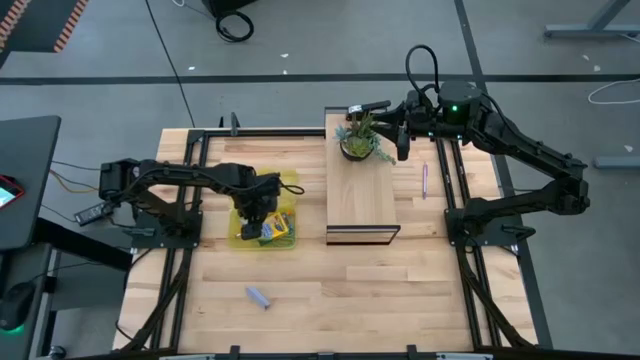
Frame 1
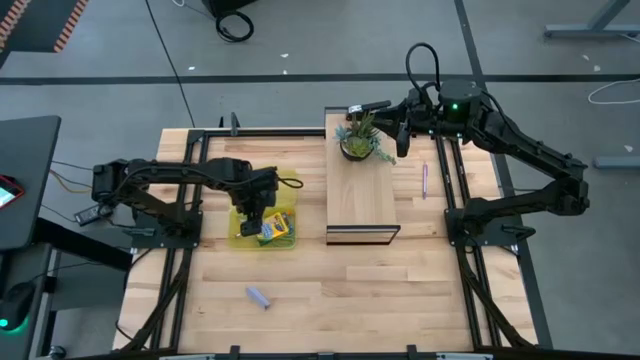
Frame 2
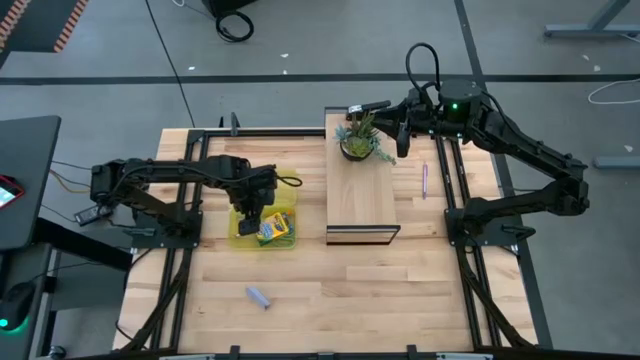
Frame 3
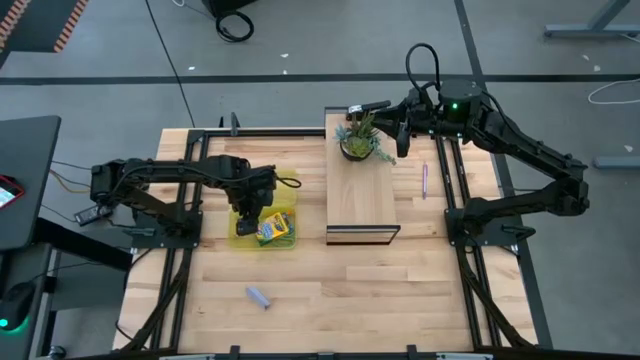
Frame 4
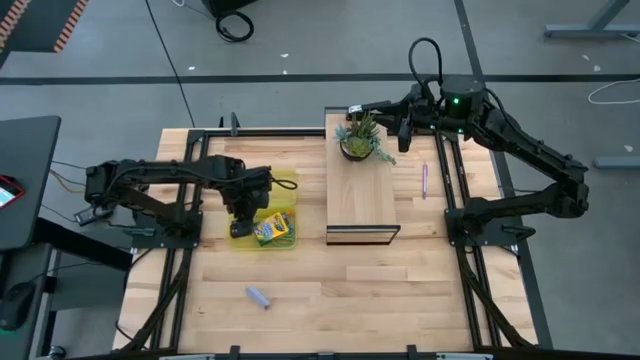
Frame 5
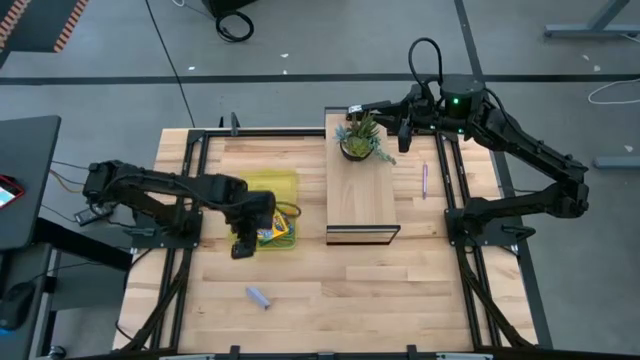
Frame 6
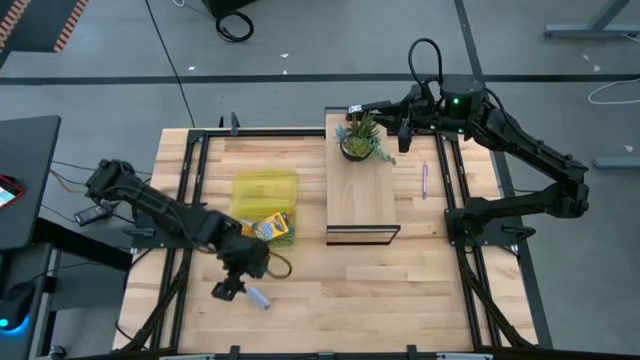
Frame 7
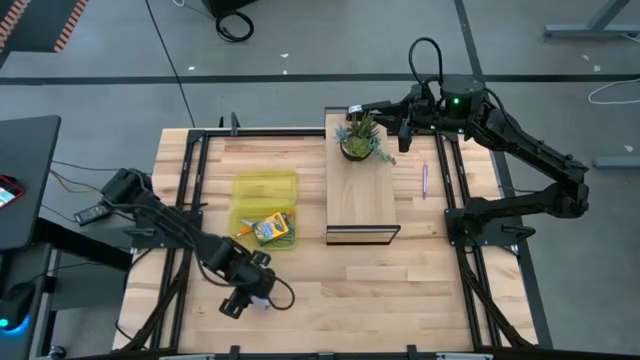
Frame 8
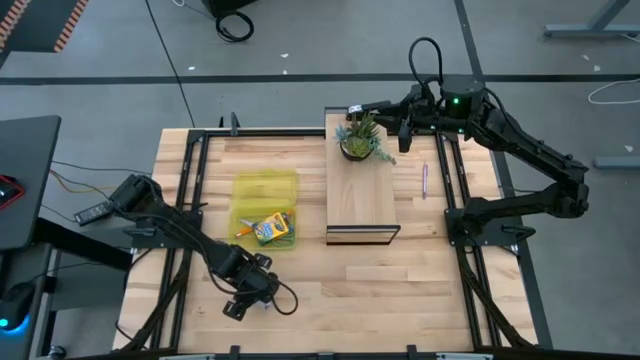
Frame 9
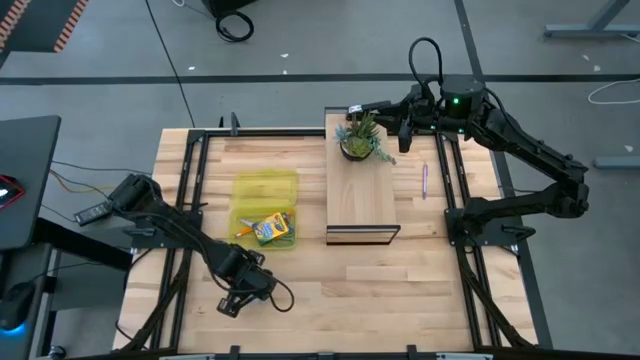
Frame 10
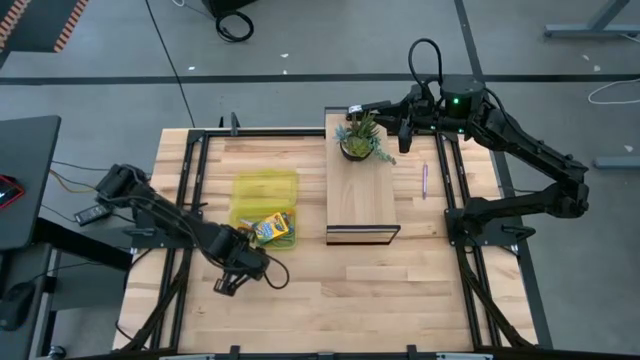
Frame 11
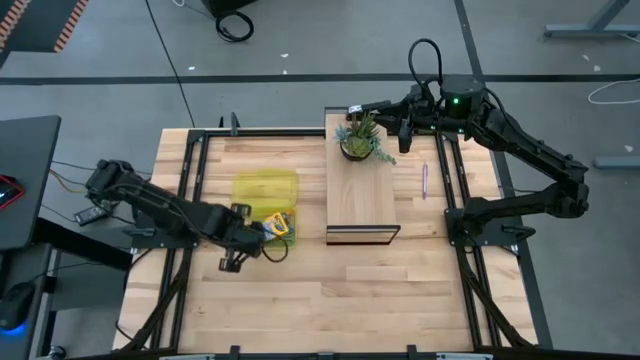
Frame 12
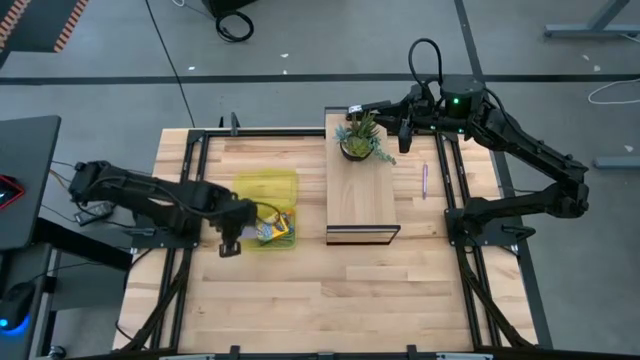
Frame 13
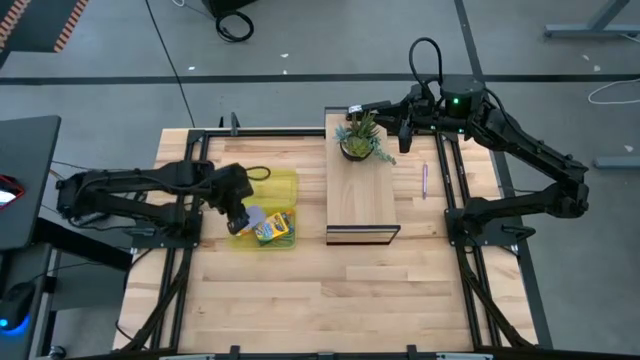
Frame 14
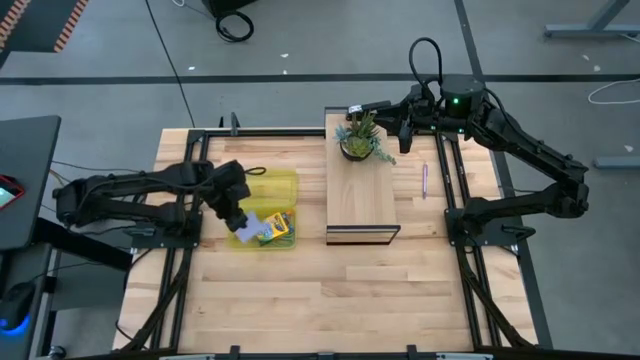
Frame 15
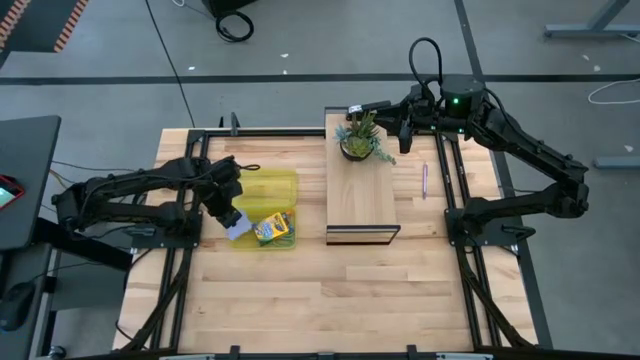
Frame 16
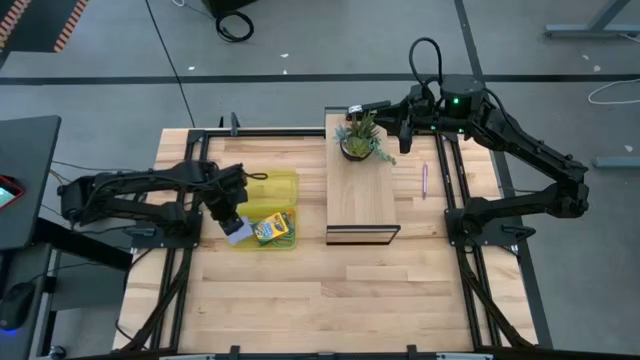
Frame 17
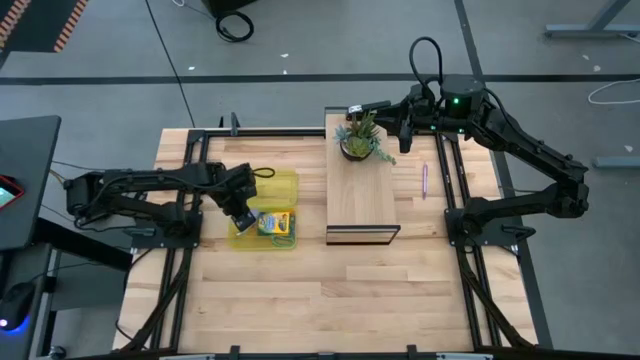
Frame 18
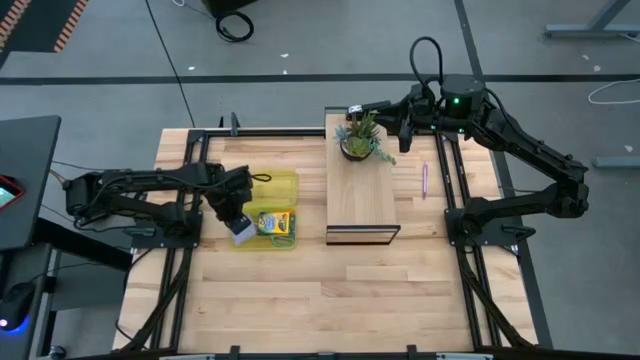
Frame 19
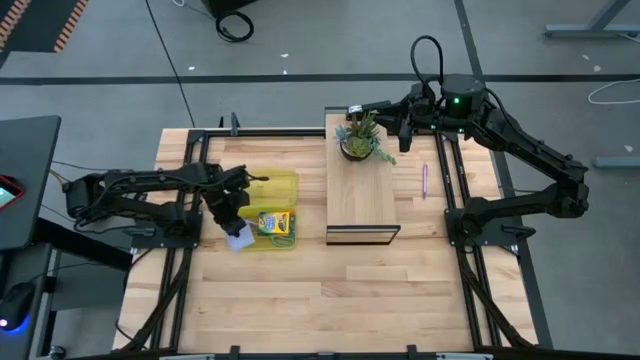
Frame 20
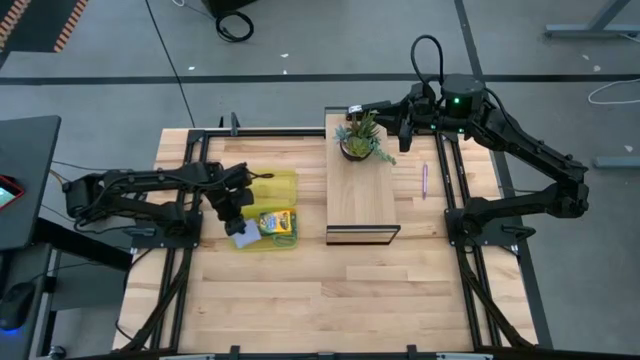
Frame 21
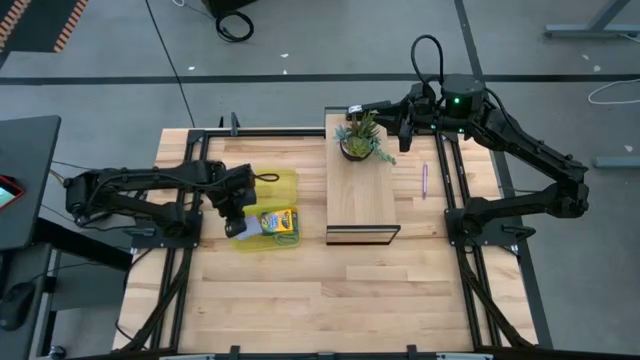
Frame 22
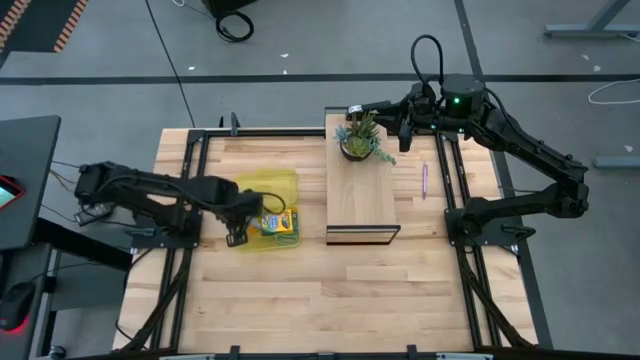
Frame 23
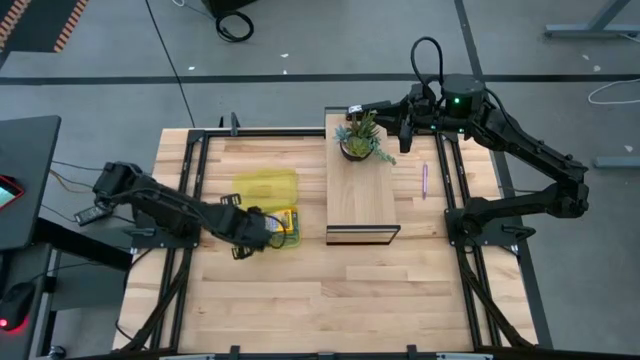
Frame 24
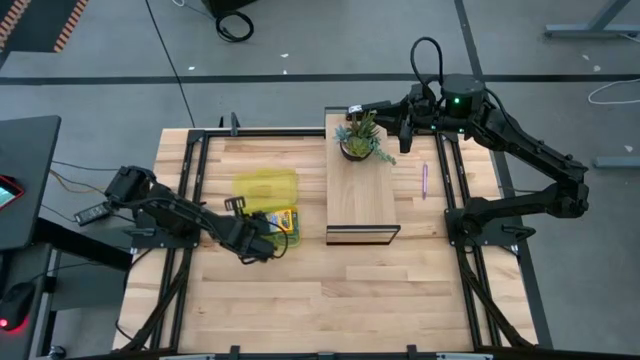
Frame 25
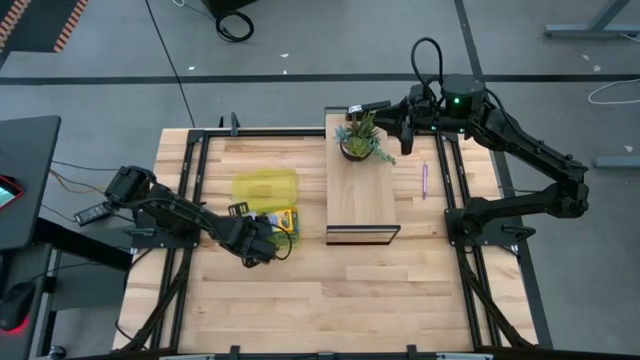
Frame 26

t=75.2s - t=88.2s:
Task: Pack school essentials
Put the white sticky note into the yellow supply box

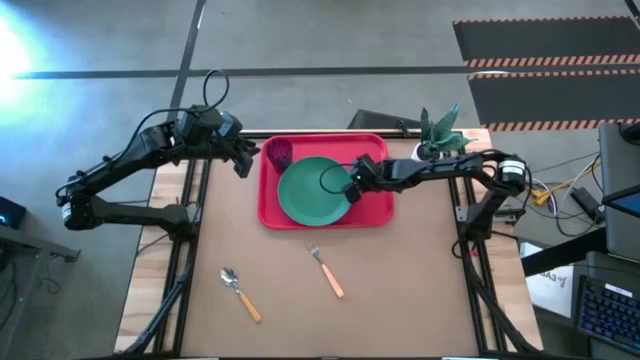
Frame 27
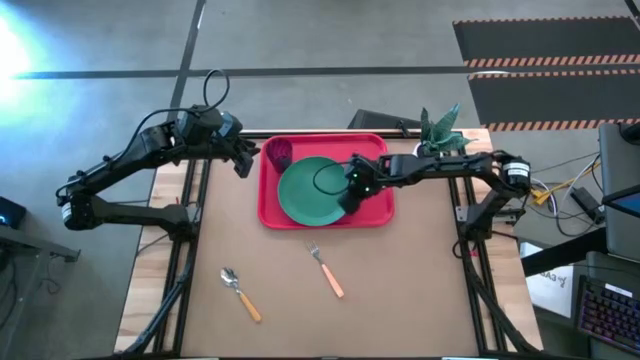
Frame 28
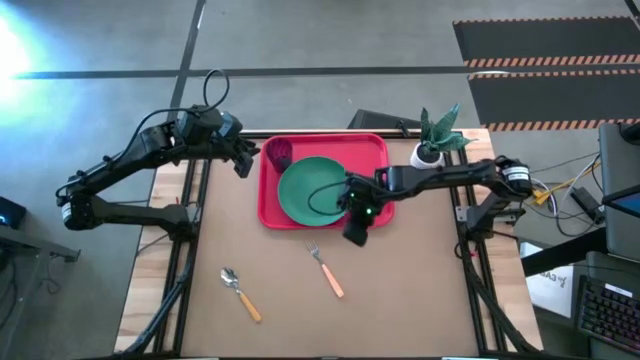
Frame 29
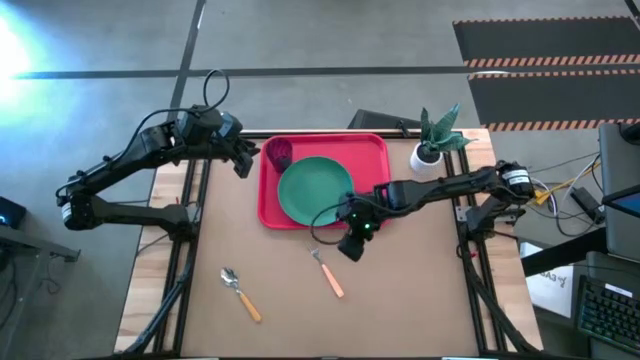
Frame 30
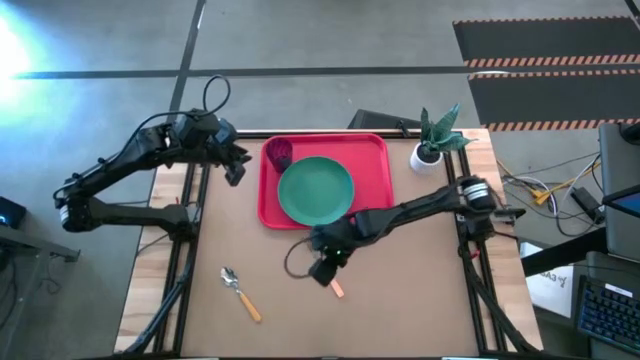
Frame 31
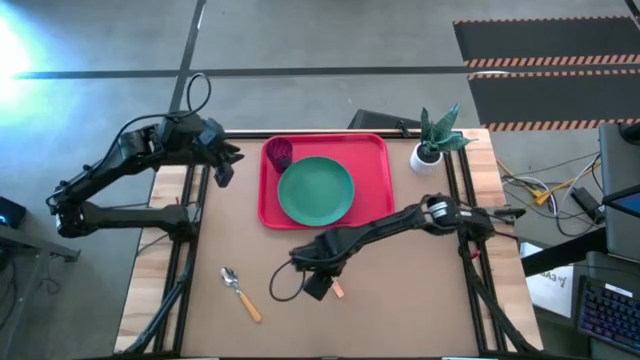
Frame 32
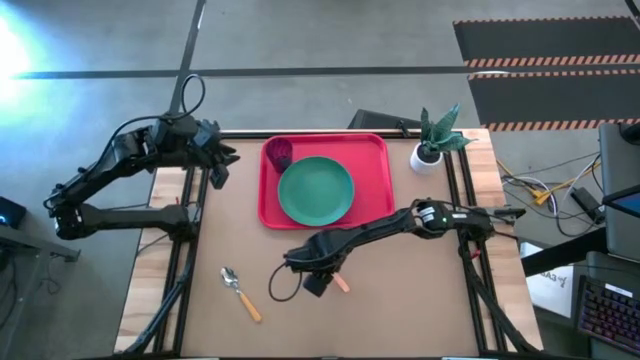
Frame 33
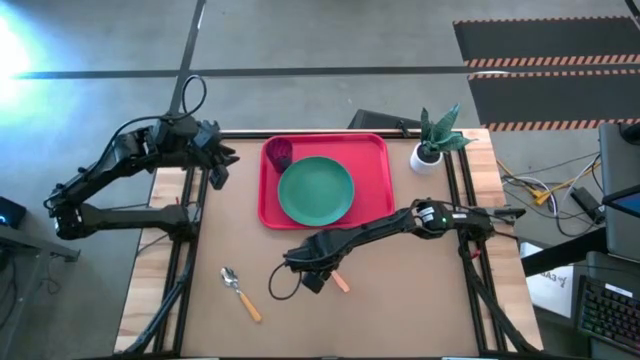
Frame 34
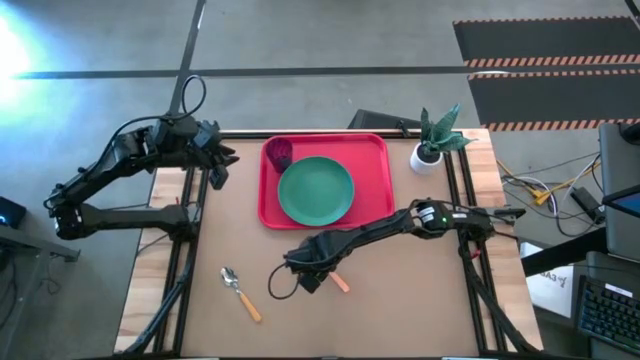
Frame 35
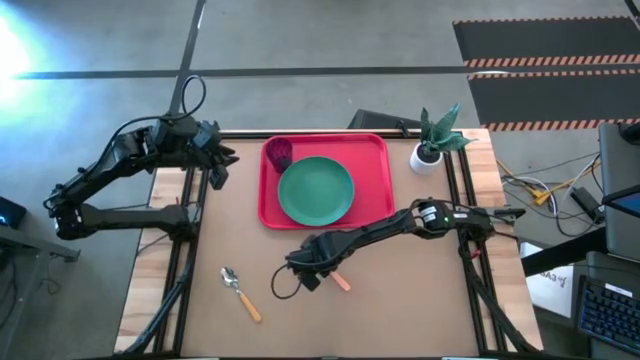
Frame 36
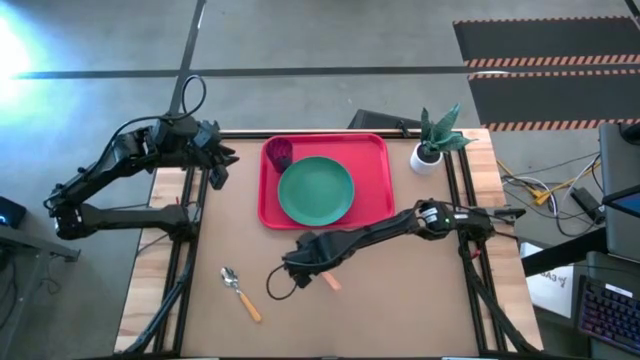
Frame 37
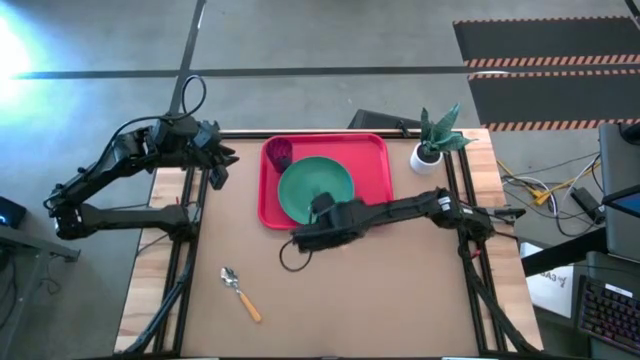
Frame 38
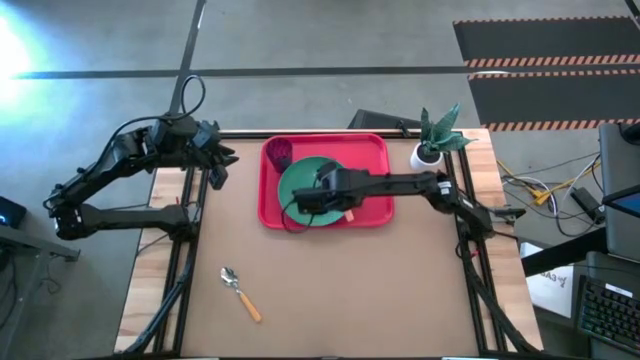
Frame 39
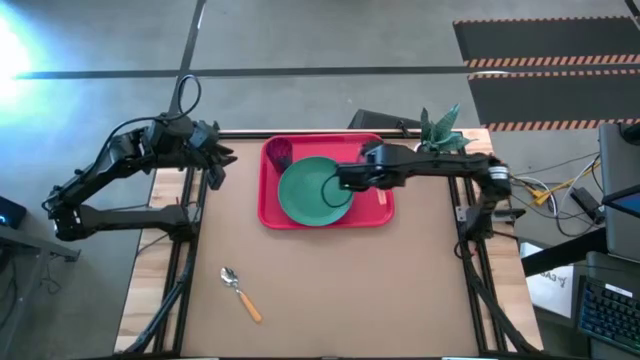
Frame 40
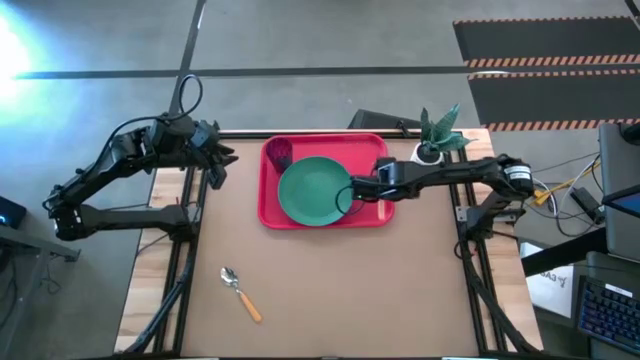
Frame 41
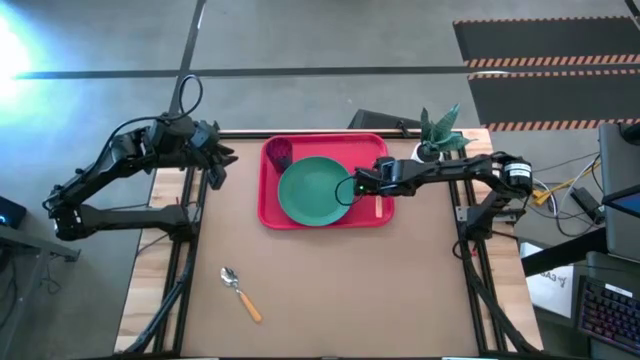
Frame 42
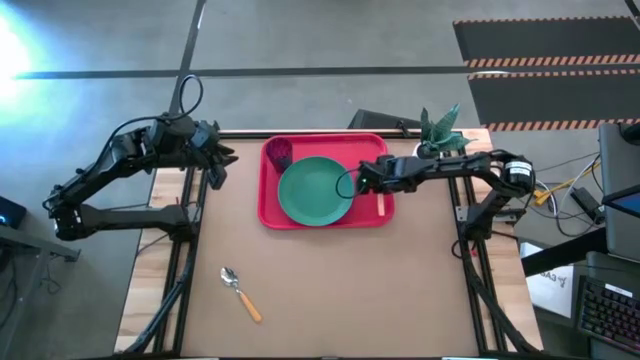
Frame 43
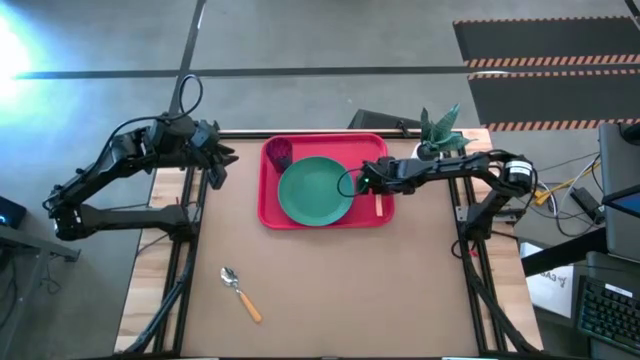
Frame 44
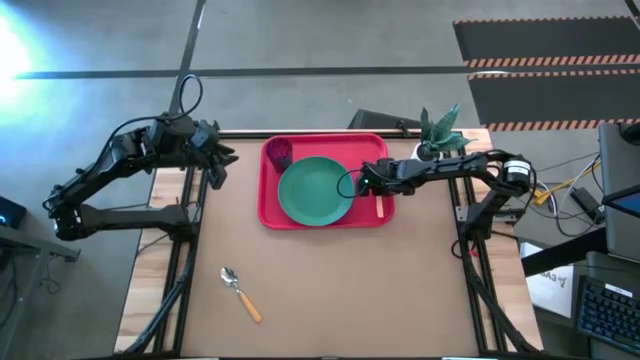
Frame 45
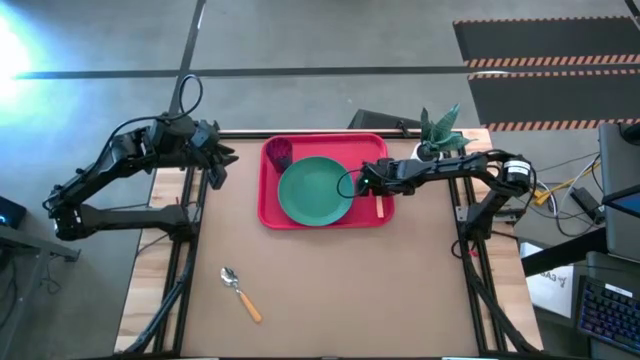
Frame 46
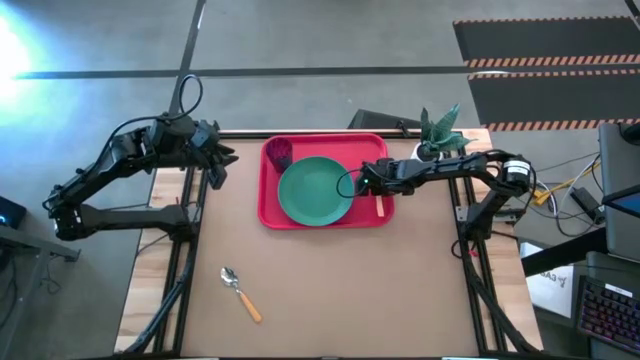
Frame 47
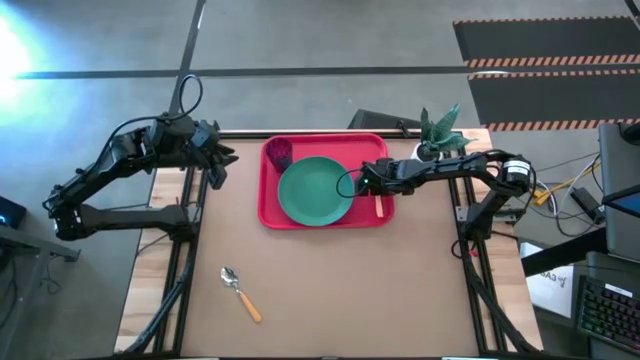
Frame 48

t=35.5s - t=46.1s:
Task: Pick and place plate/cup/fork/spoon on tray
Put the orange fork on the right side of the green plate on the orange tray
